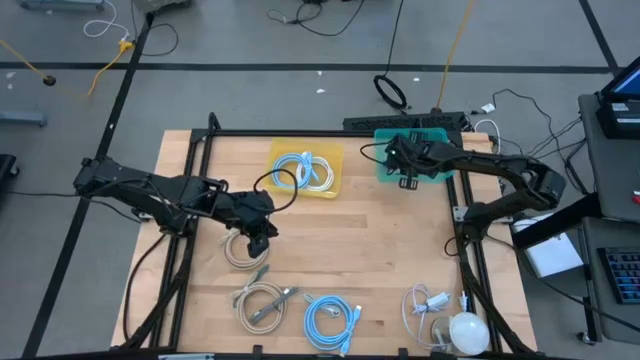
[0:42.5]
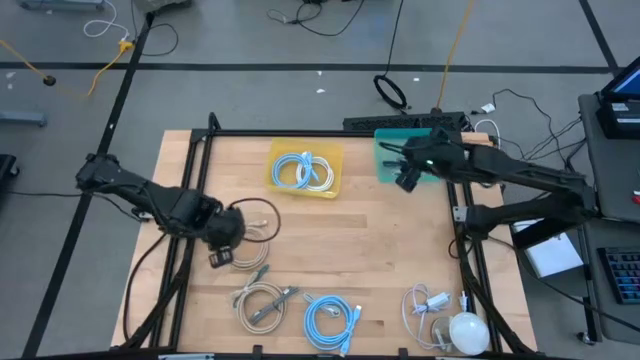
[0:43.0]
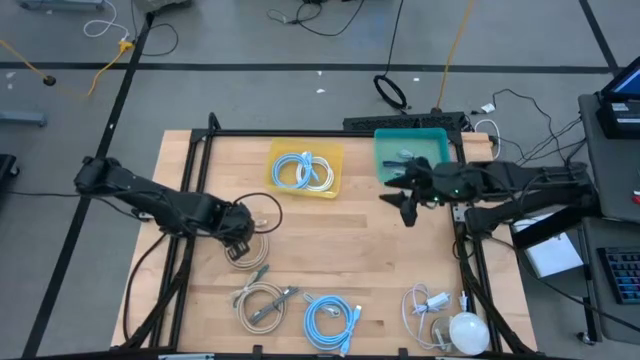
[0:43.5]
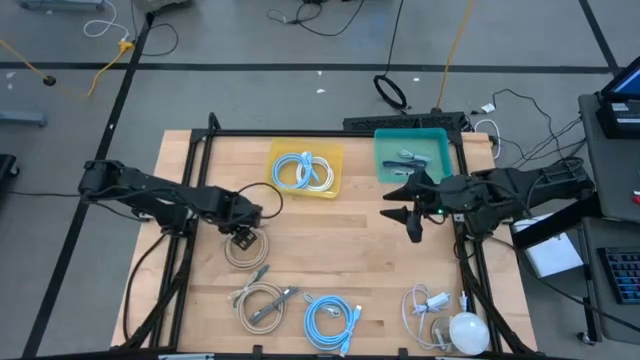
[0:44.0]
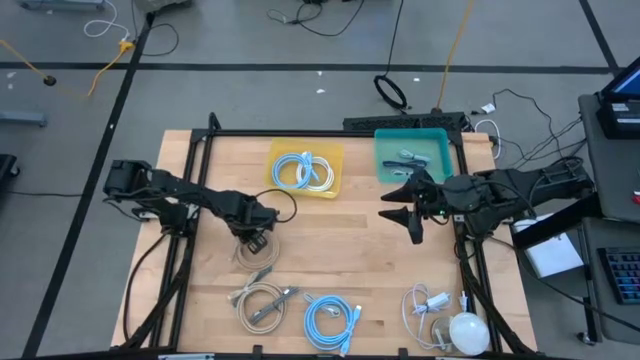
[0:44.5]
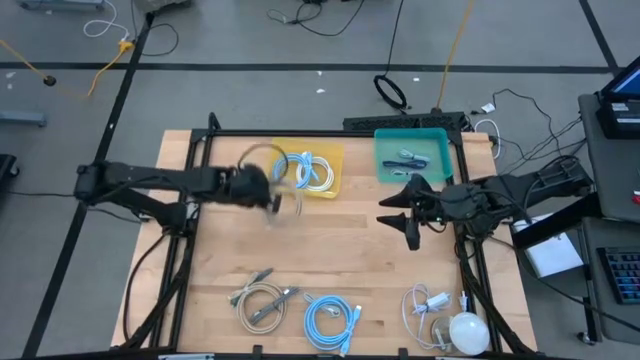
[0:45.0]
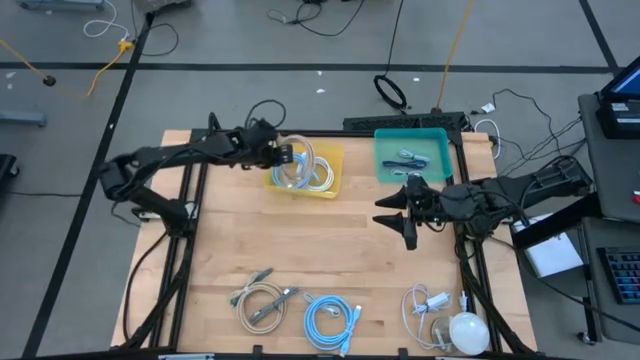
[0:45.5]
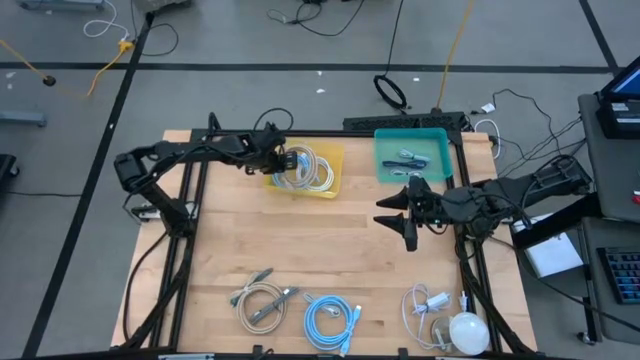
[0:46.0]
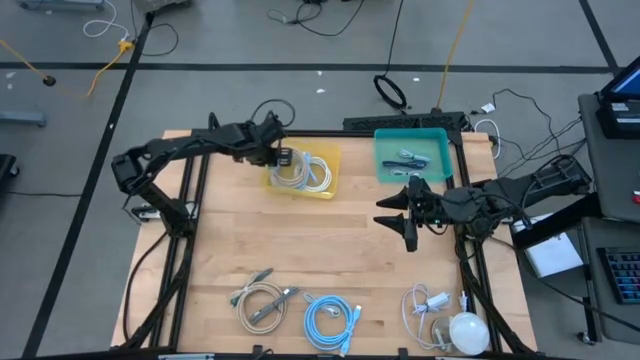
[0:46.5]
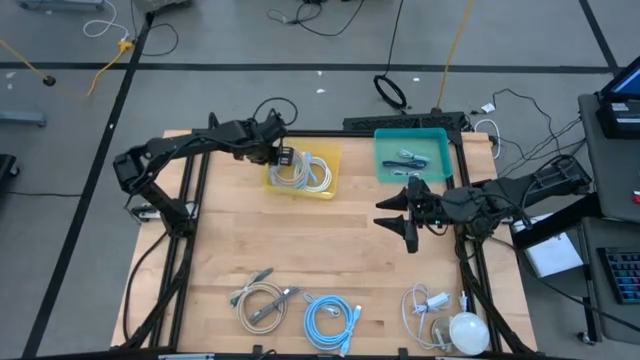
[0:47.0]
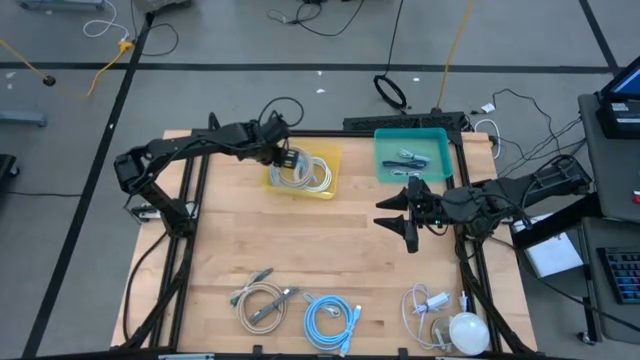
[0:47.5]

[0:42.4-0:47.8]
Task: Pick & Place USB Port
Put the top brown USB cable into the yellow bin

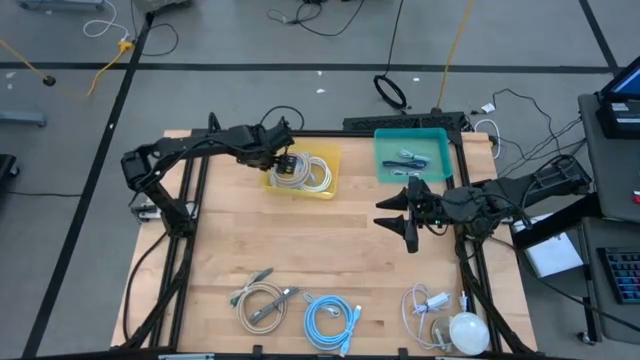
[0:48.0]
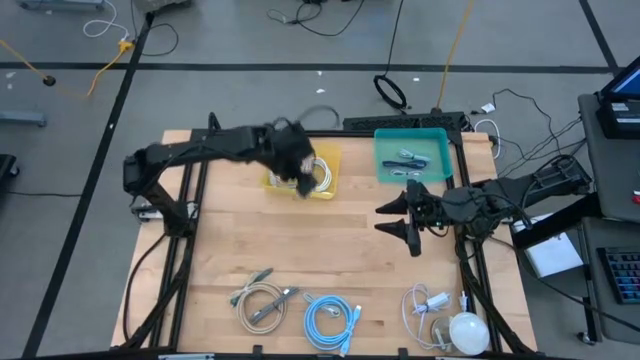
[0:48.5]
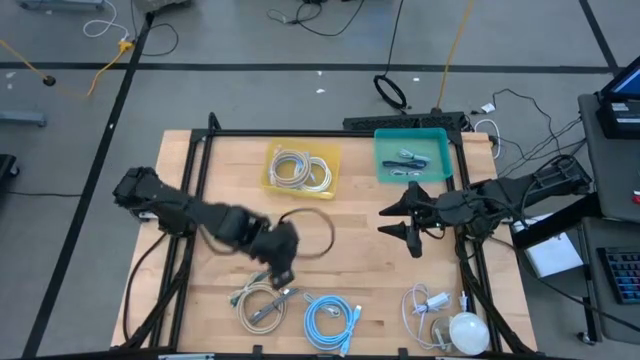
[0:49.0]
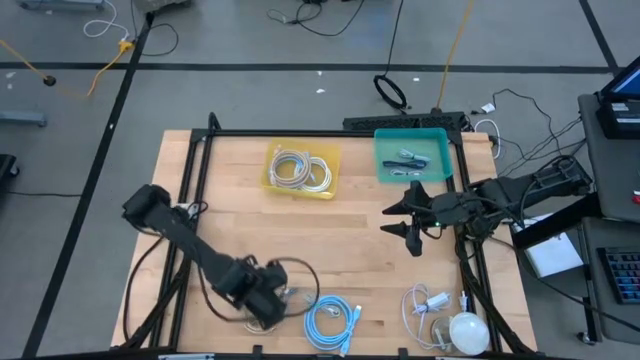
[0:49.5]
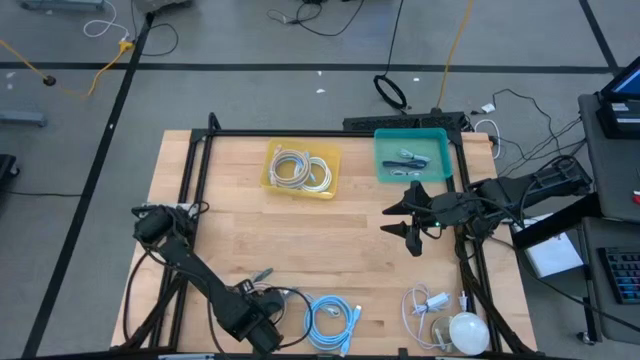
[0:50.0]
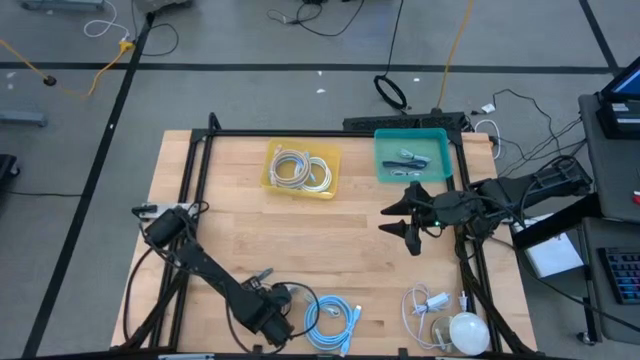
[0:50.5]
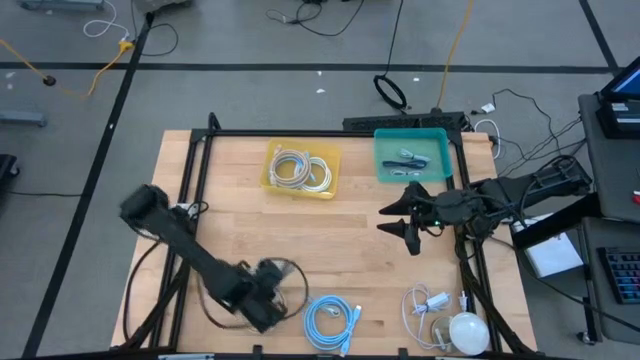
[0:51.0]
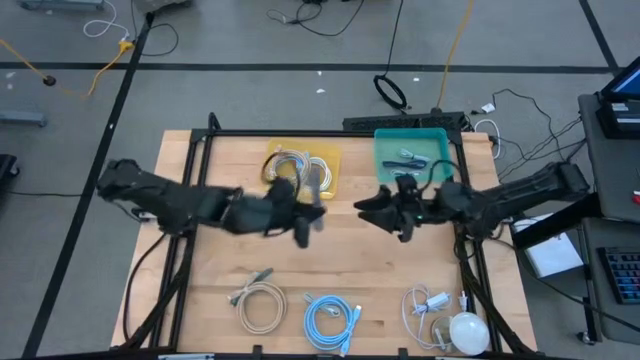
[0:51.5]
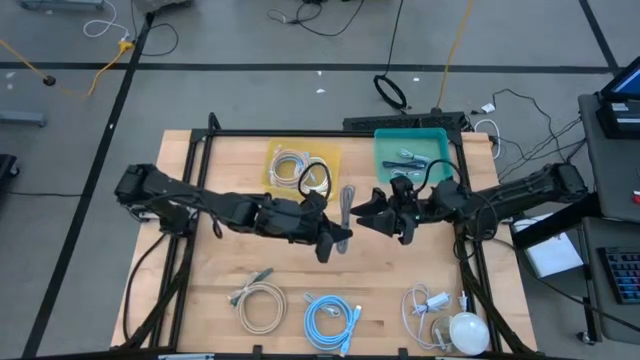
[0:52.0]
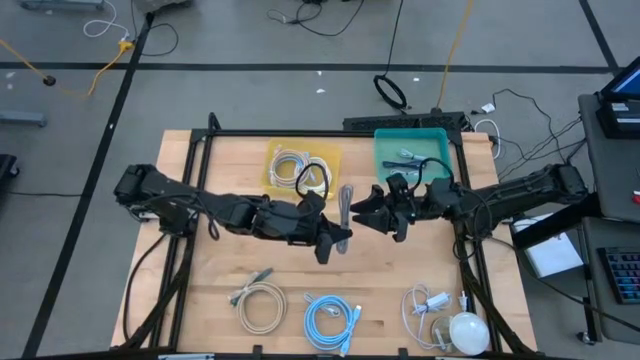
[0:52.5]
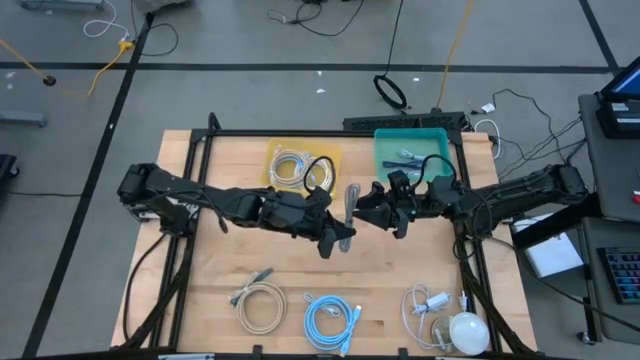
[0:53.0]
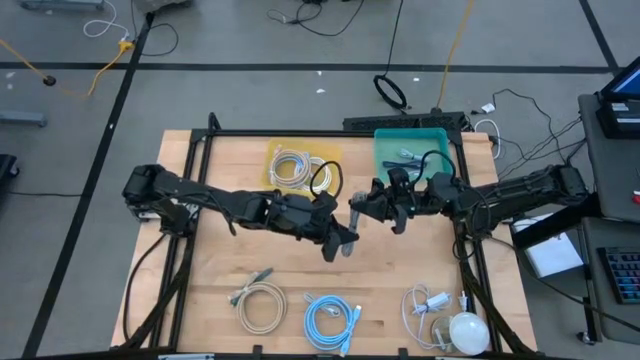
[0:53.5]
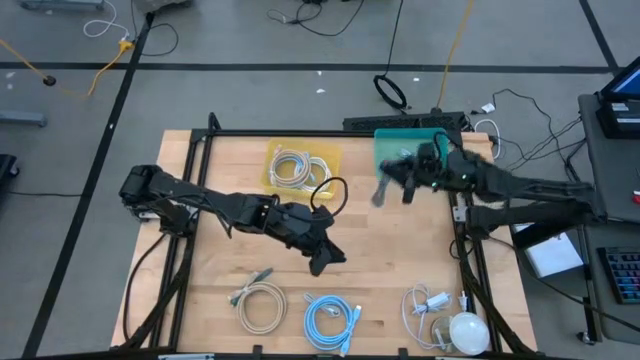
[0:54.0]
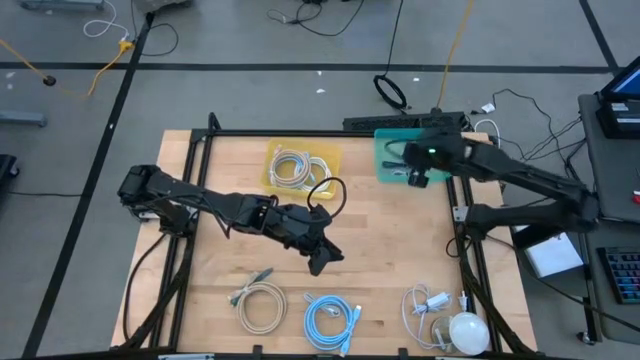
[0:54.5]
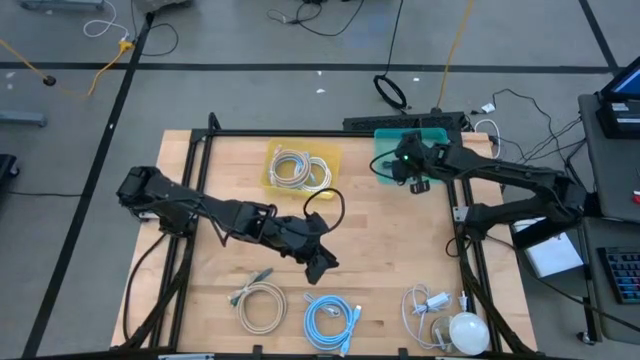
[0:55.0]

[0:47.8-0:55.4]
Put the white patterned charger cable into the green bin

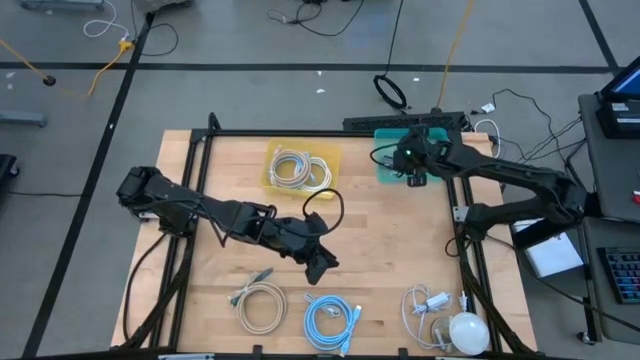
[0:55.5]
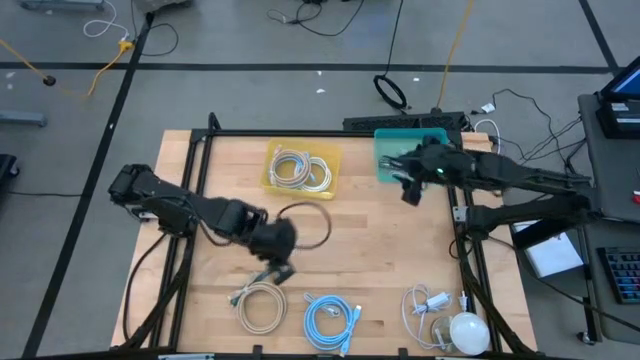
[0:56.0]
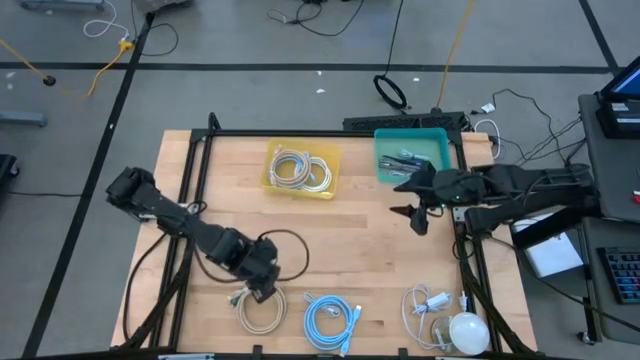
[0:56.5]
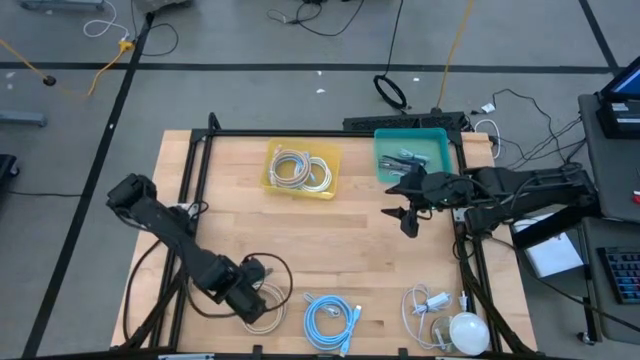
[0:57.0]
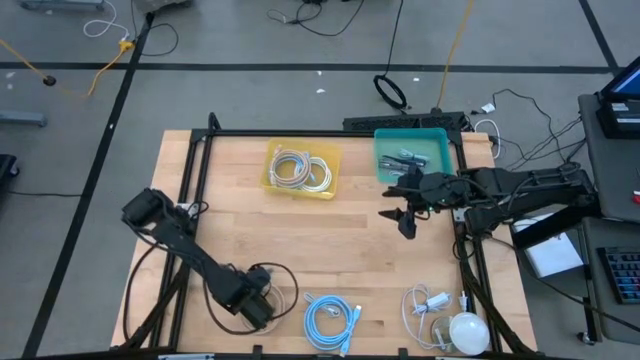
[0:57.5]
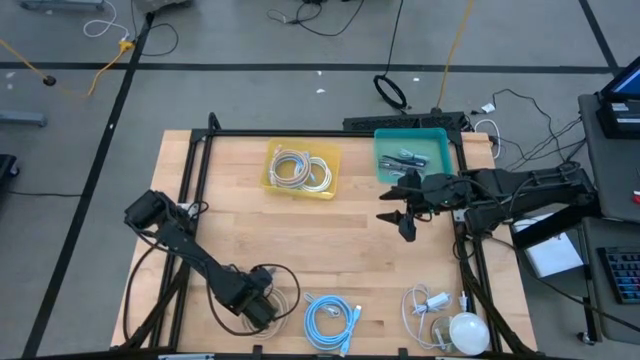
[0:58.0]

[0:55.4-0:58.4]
Put the brown USB cable into the yellow bin

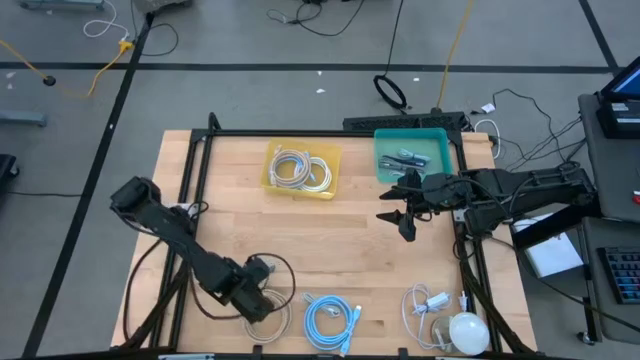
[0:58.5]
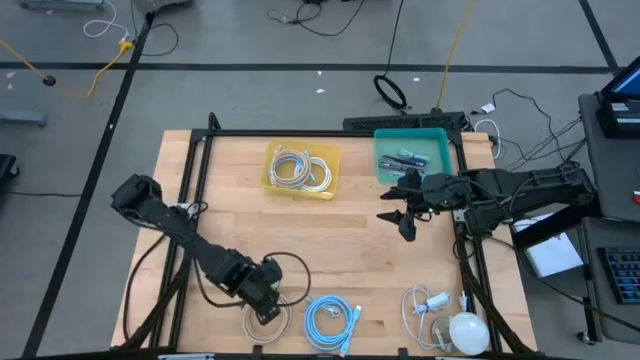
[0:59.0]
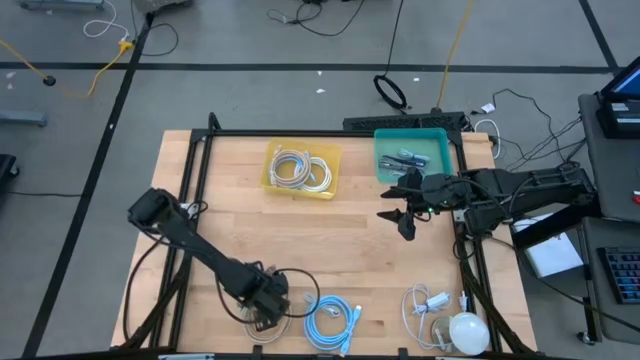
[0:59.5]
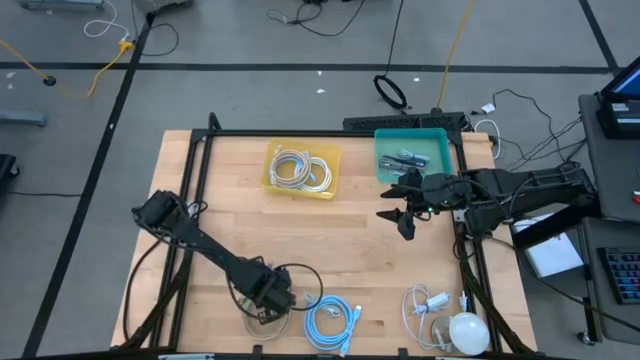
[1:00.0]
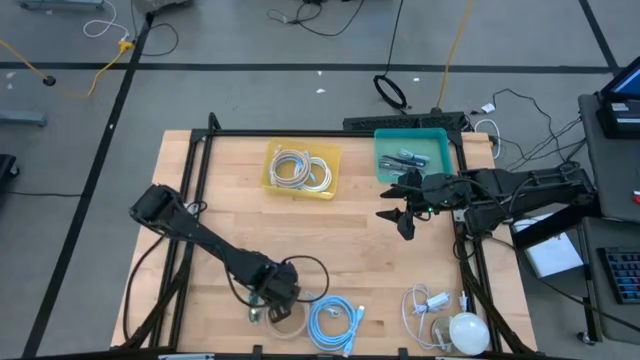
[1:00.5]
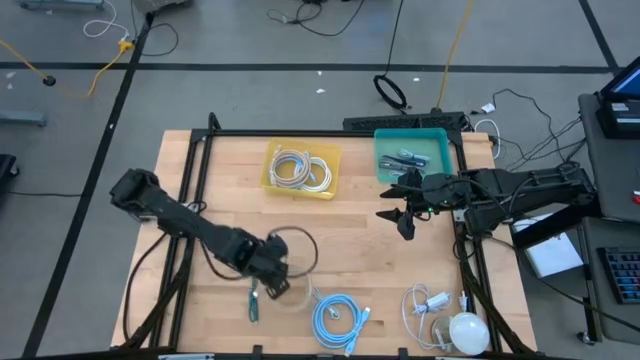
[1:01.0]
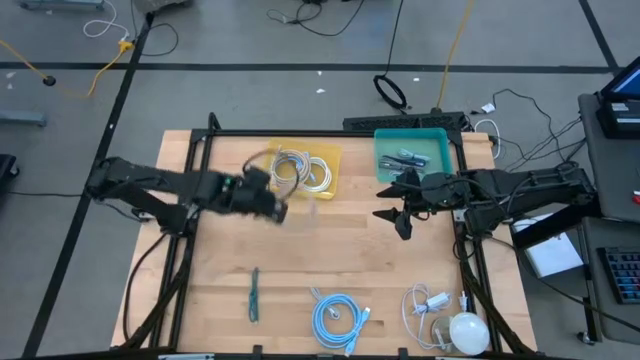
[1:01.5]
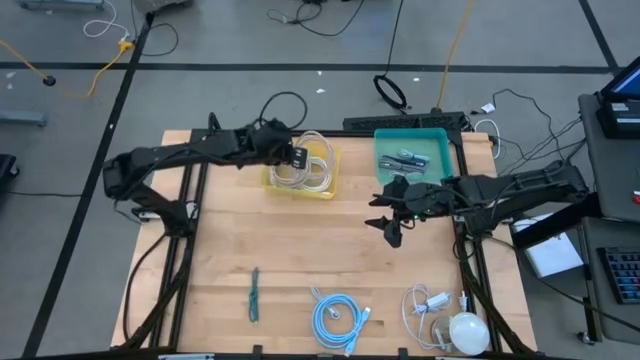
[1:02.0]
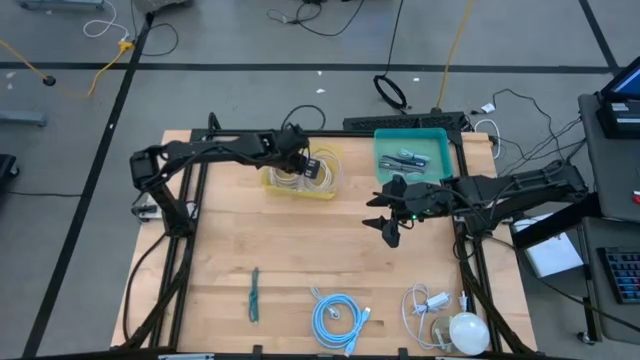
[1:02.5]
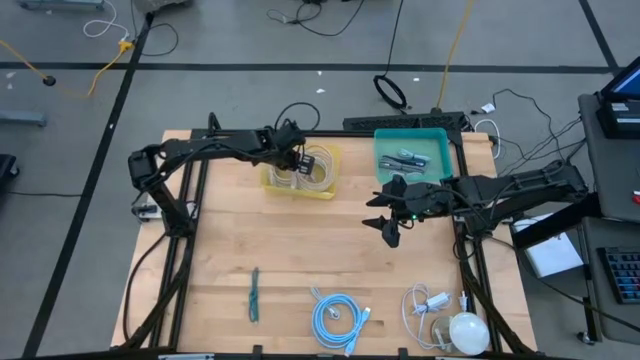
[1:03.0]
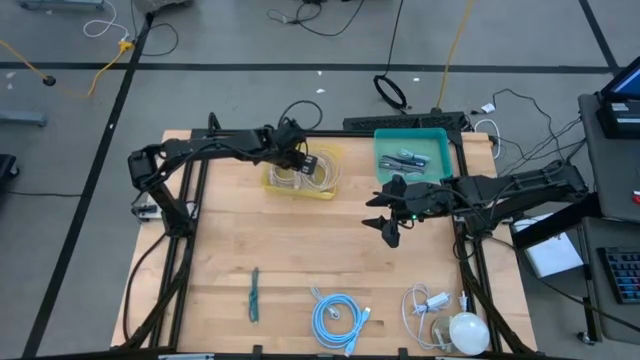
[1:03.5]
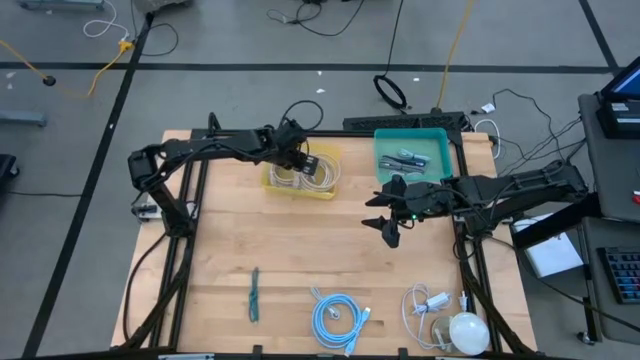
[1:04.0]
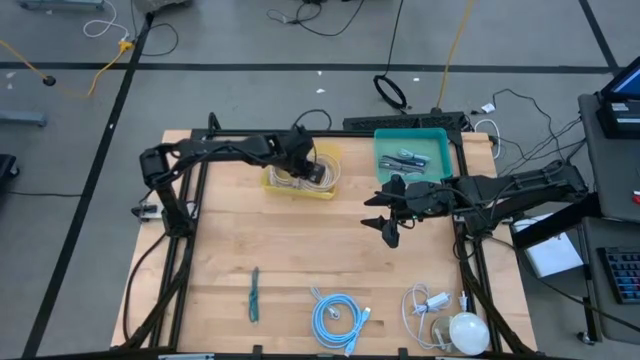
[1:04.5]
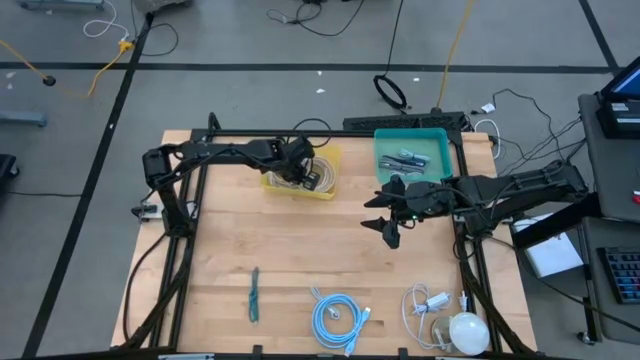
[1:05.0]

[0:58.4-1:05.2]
Put the brown USB cable into the yellow bin
